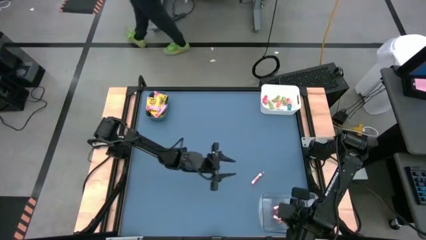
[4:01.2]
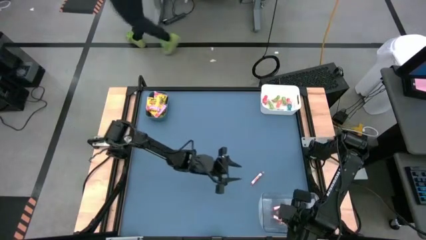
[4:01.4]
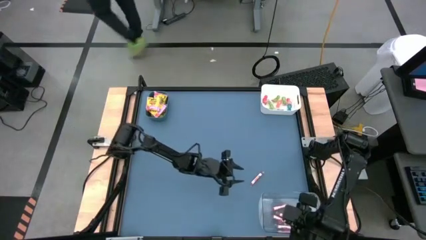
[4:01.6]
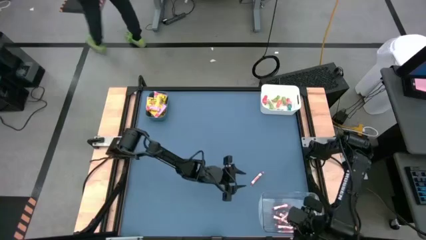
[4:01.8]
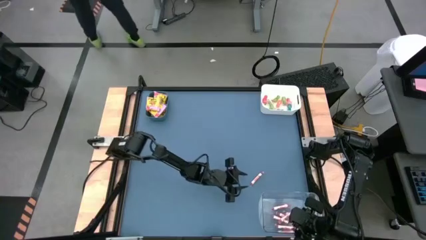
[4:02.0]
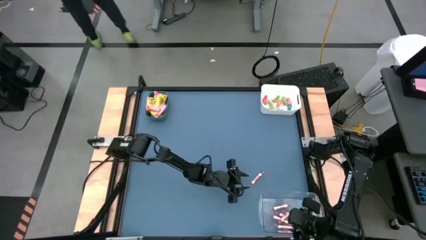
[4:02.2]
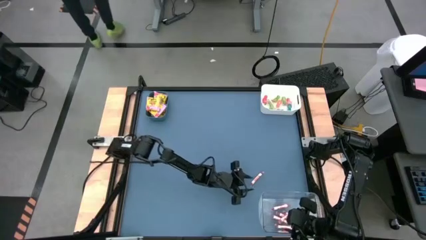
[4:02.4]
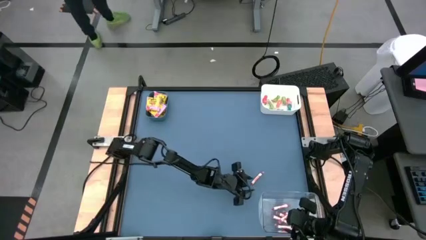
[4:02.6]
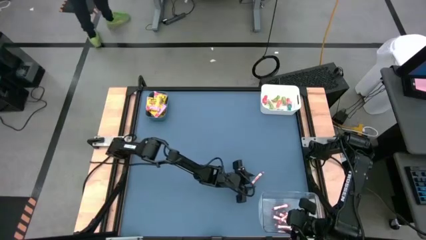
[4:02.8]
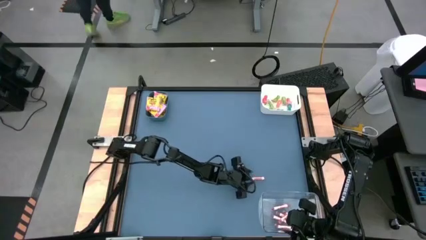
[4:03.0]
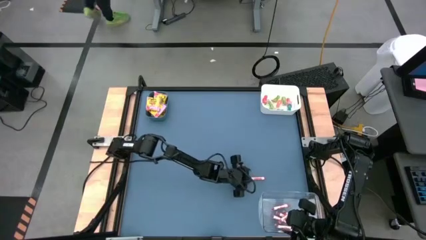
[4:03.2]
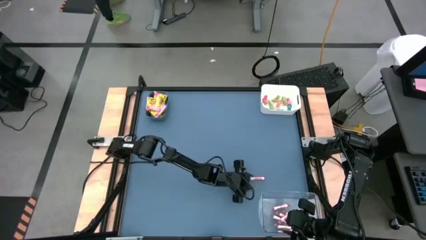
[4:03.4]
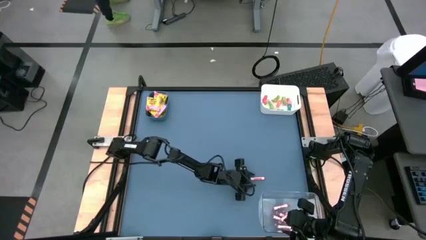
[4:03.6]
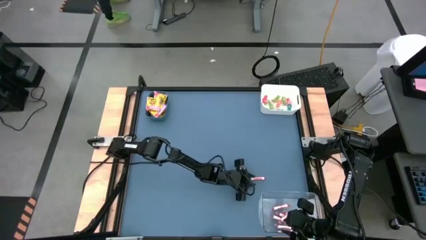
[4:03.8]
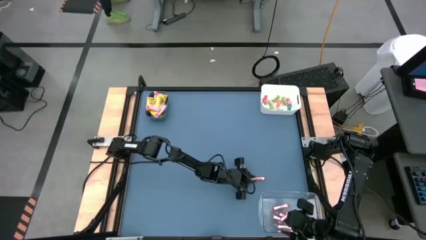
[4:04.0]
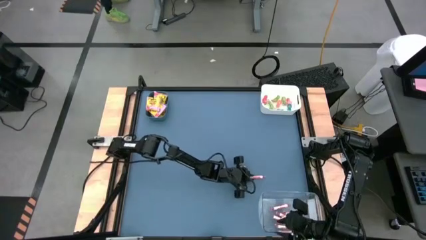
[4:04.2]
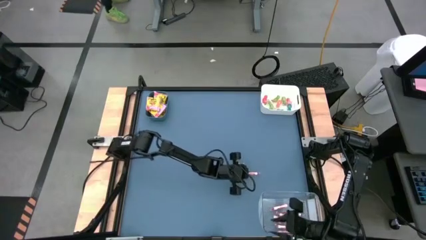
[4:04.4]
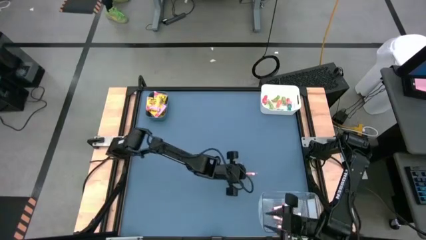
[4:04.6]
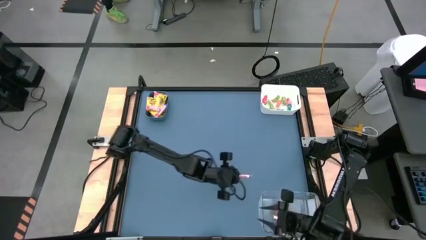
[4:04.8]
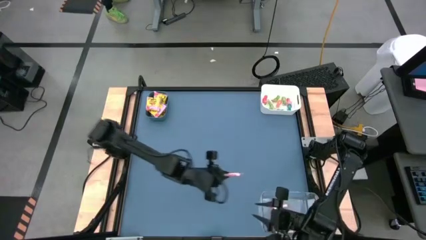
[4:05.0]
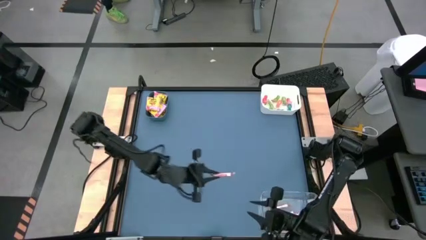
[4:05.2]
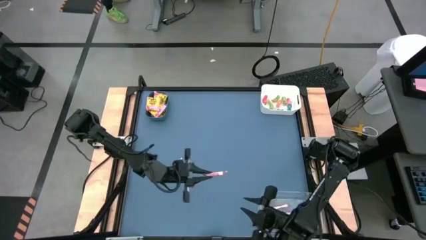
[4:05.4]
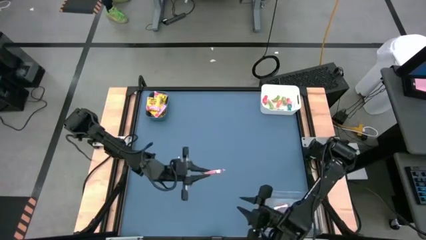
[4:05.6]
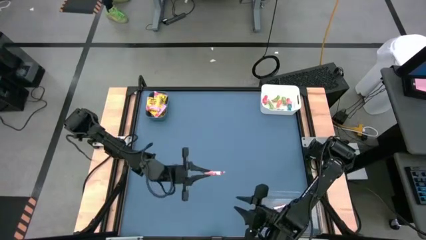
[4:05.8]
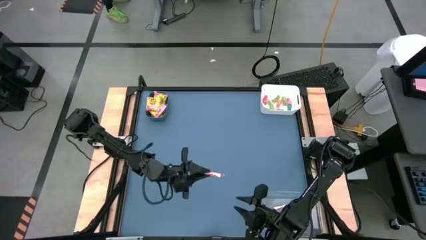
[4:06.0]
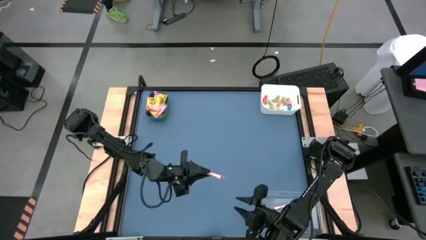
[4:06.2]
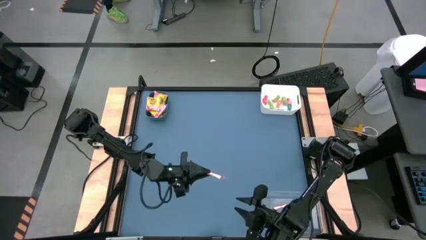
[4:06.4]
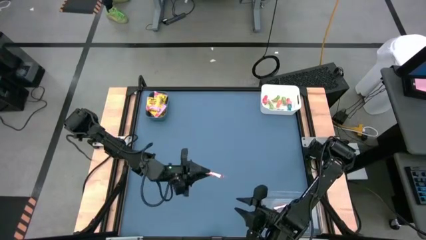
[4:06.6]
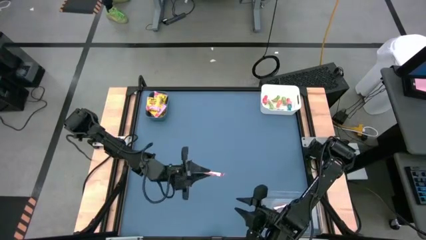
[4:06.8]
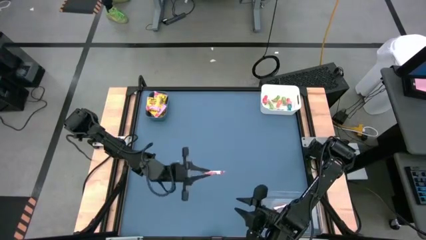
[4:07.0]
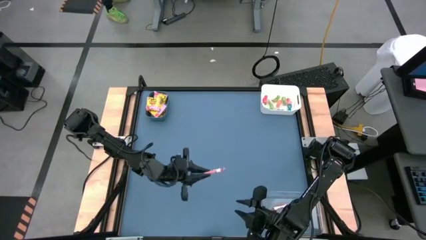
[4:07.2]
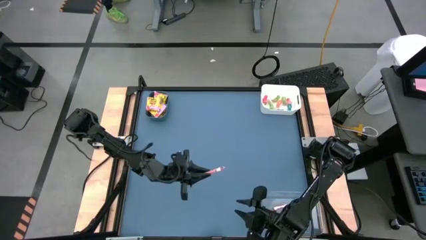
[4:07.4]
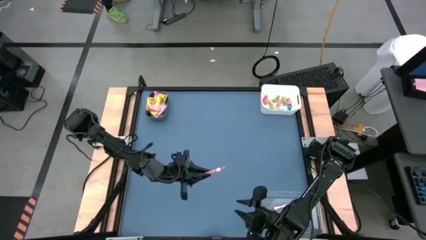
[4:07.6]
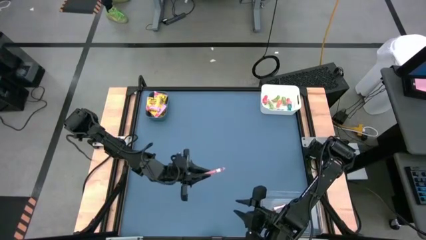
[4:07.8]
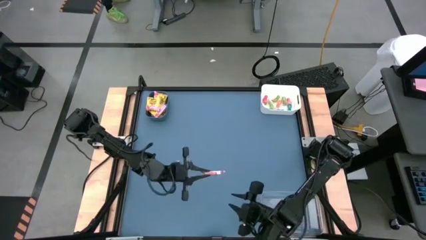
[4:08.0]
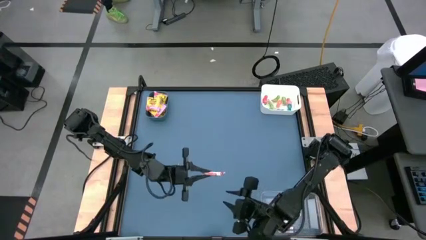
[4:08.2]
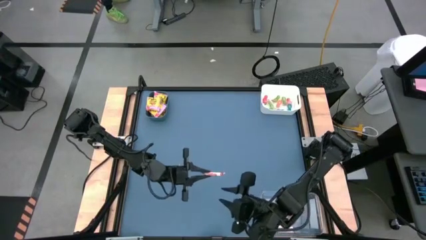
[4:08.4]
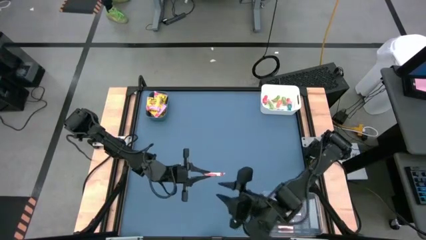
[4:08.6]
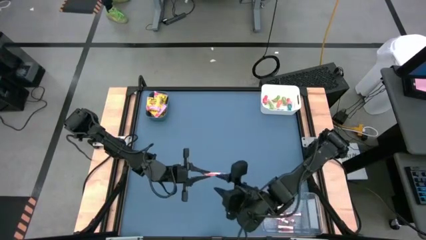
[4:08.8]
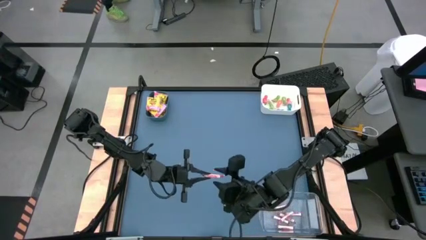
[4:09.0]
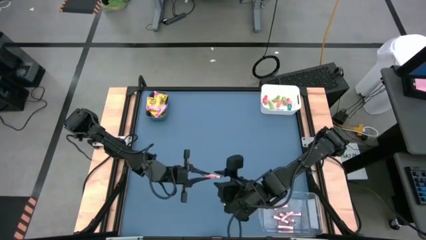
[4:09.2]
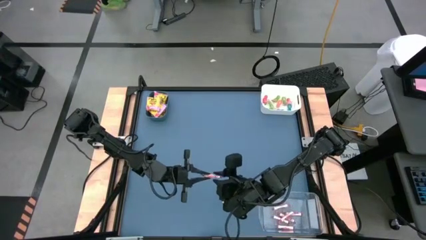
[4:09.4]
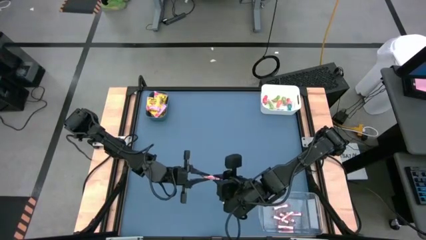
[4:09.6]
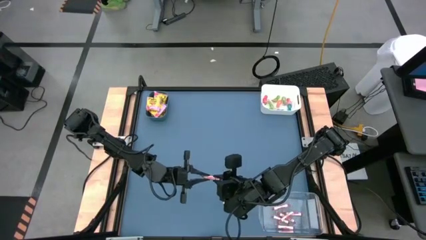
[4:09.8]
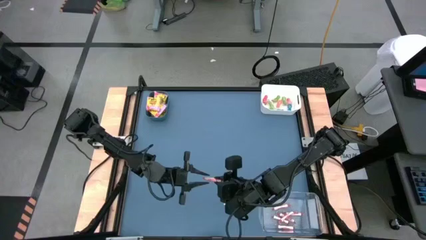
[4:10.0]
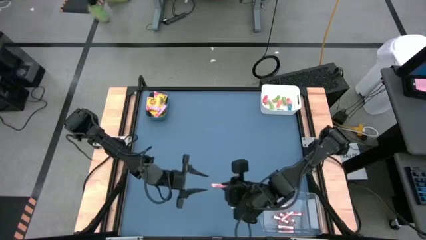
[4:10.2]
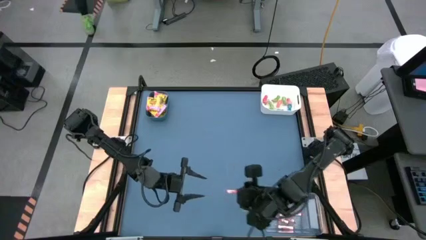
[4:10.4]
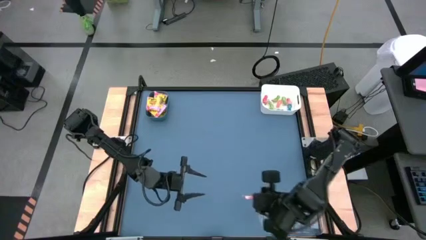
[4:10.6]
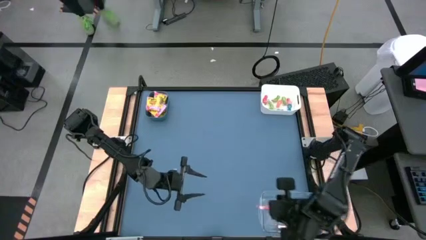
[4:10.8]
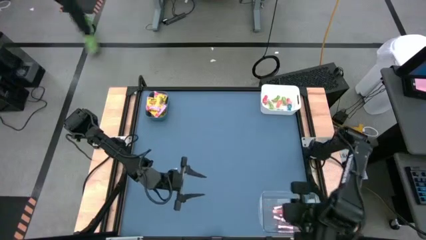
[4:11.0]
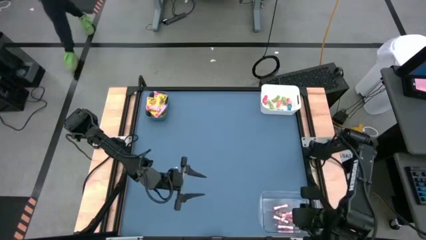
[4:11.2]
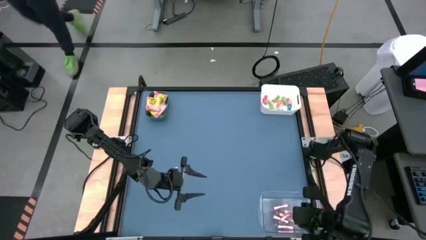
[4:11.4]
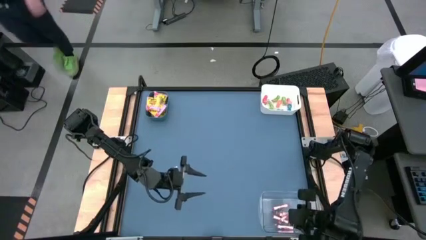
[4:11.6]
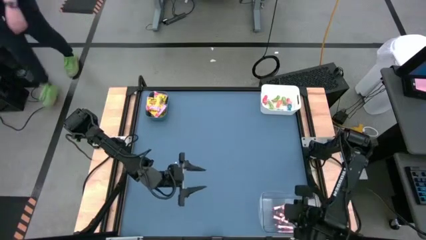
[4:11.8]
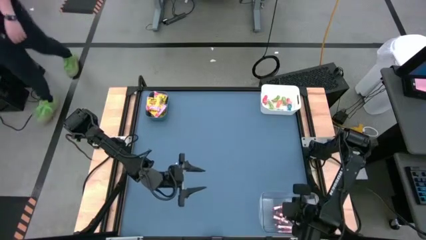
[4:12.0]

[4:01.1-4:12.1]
Task: Sort candy
Put the white candy into the transparent bin
